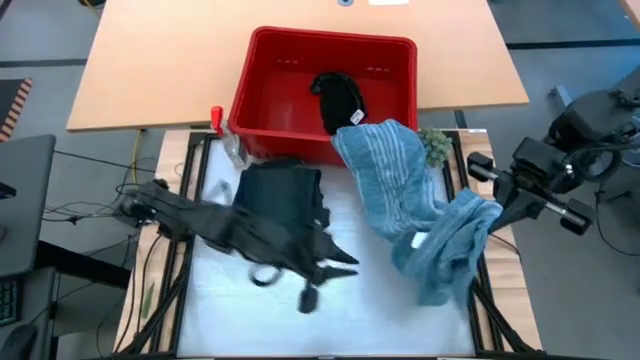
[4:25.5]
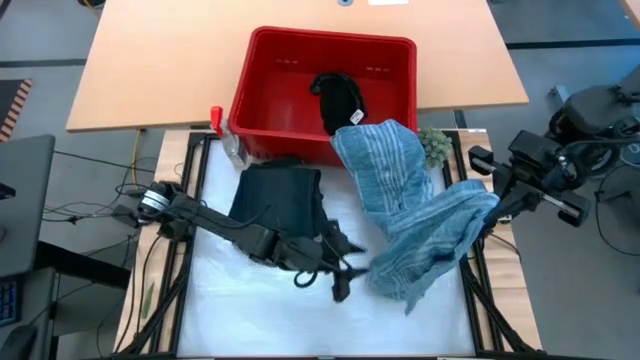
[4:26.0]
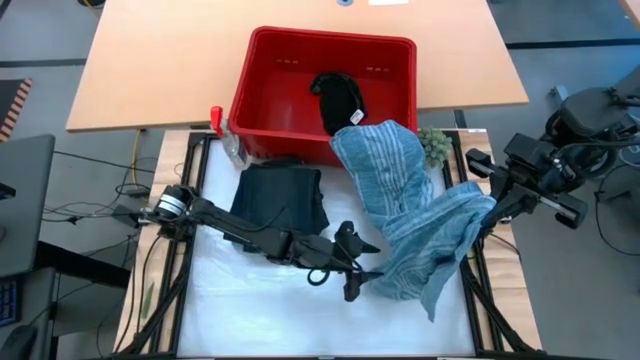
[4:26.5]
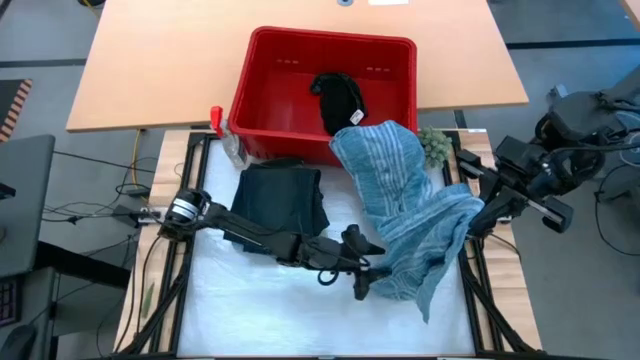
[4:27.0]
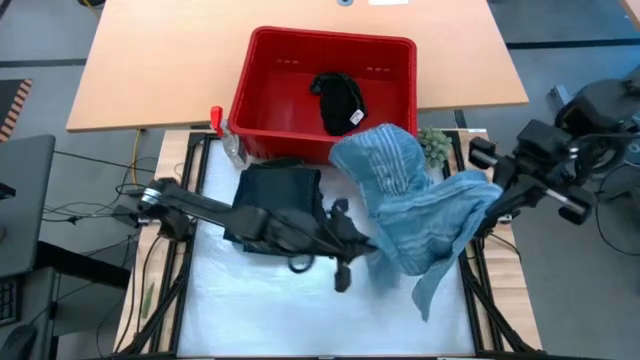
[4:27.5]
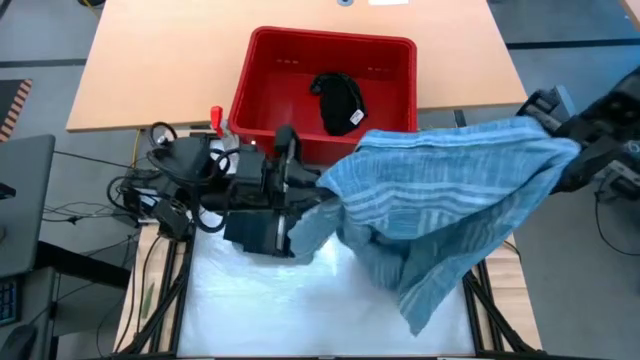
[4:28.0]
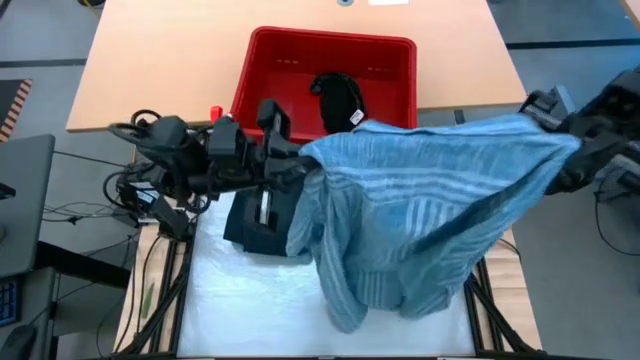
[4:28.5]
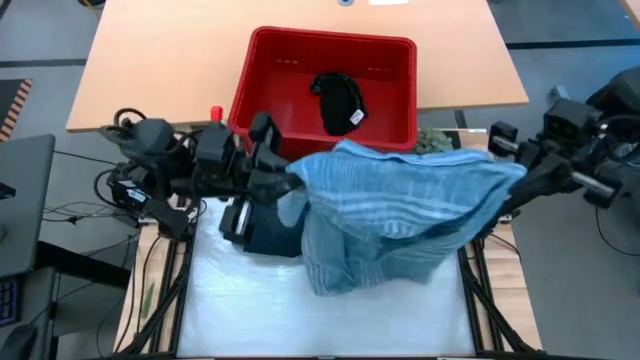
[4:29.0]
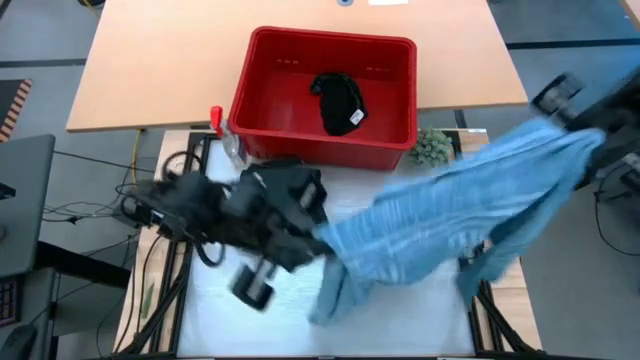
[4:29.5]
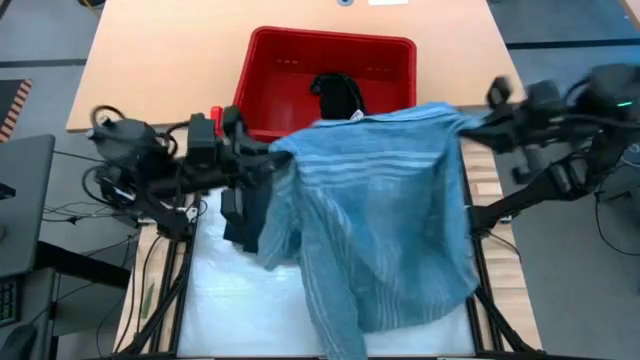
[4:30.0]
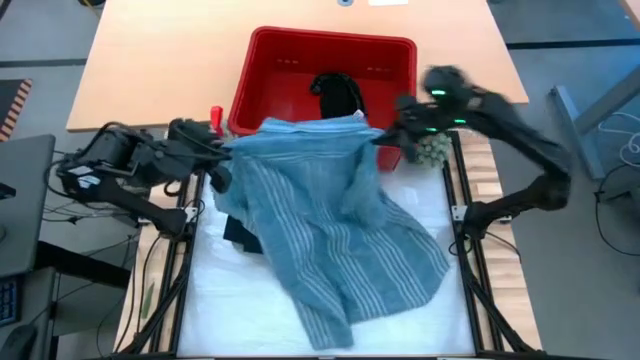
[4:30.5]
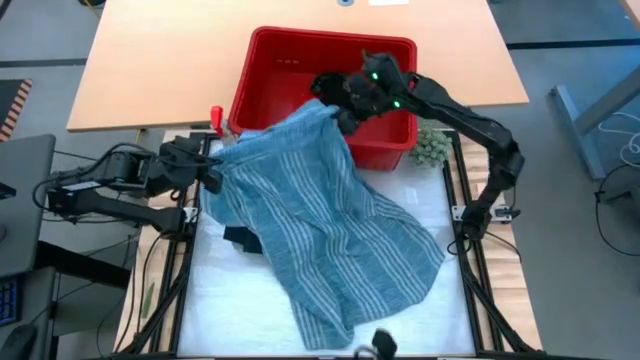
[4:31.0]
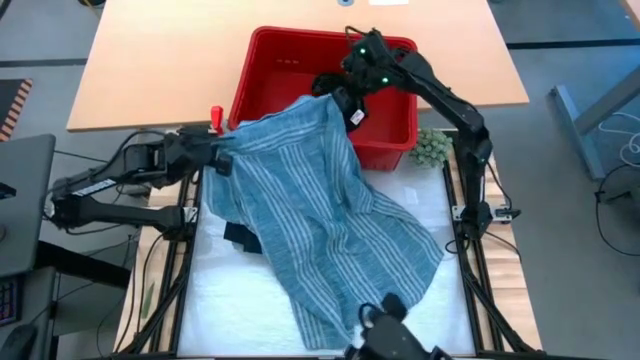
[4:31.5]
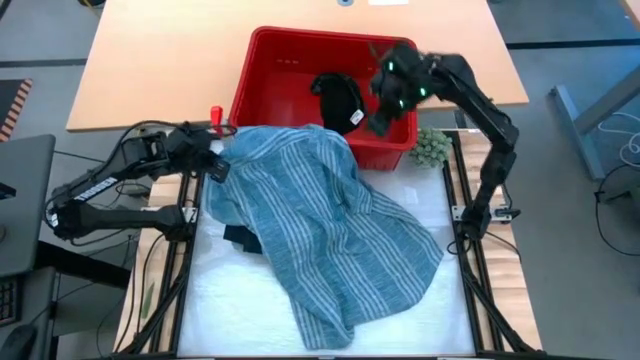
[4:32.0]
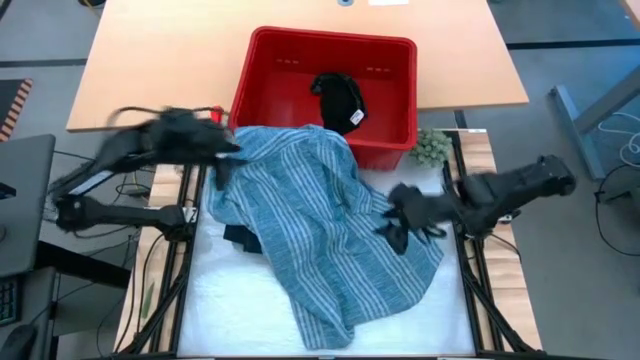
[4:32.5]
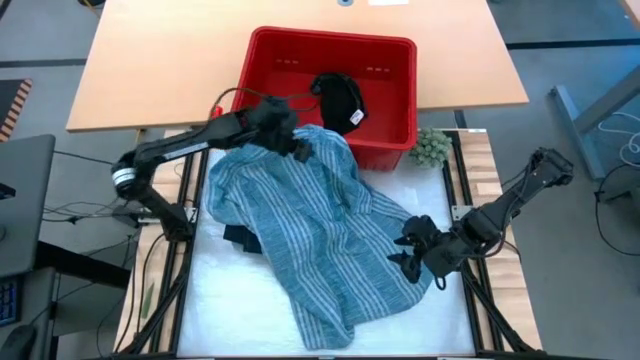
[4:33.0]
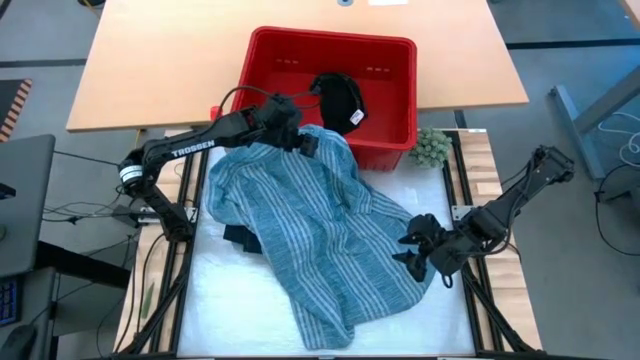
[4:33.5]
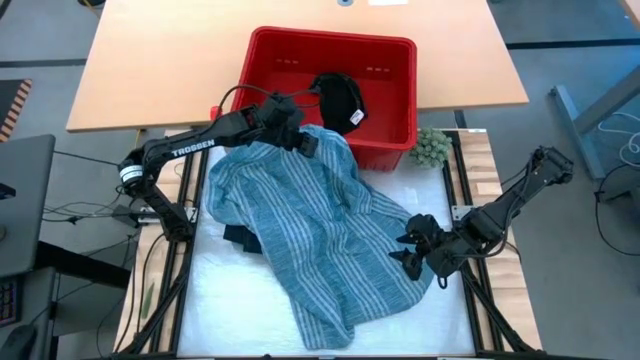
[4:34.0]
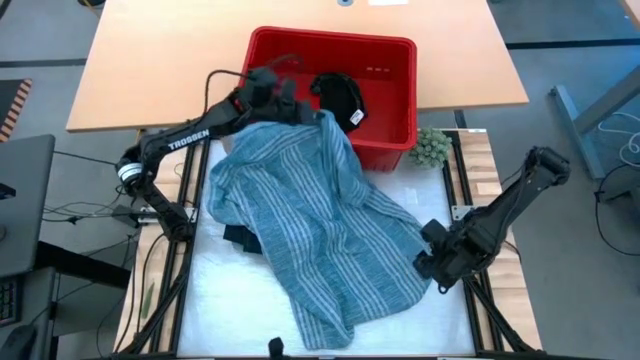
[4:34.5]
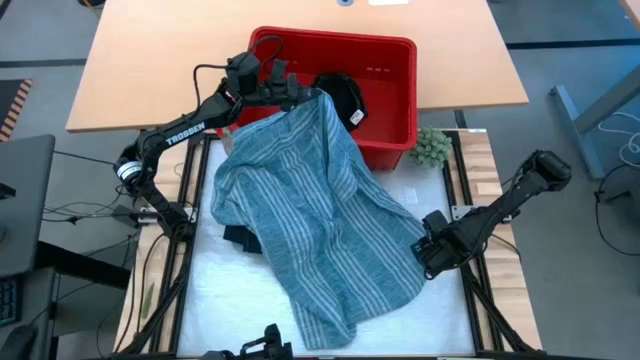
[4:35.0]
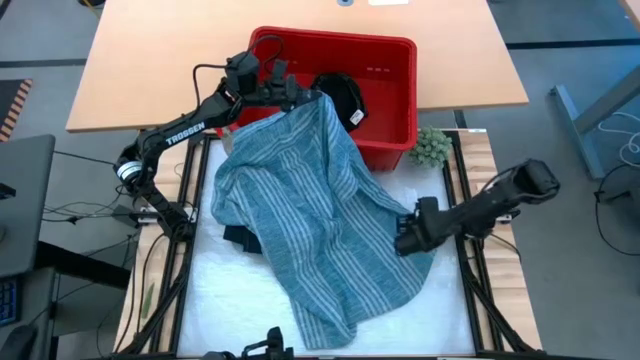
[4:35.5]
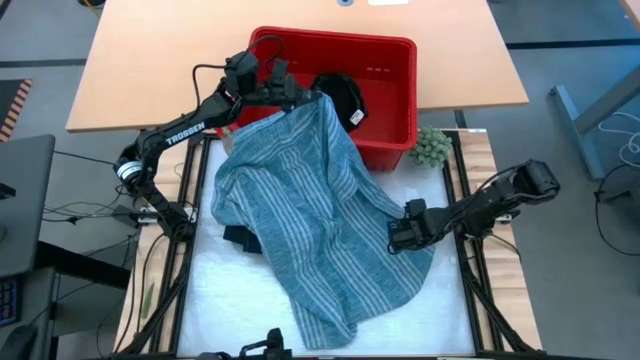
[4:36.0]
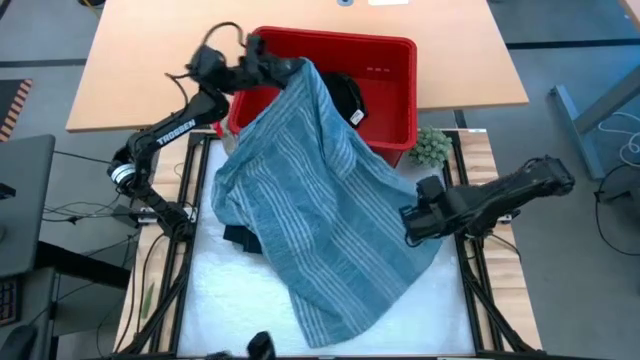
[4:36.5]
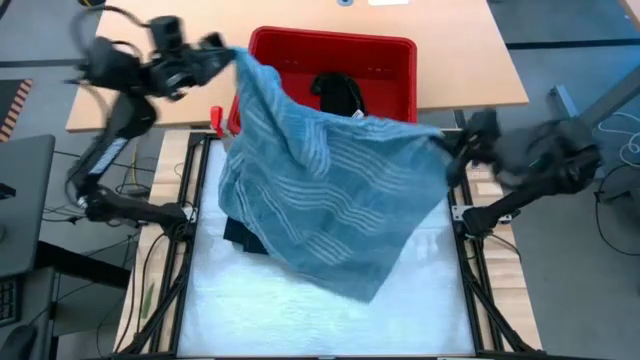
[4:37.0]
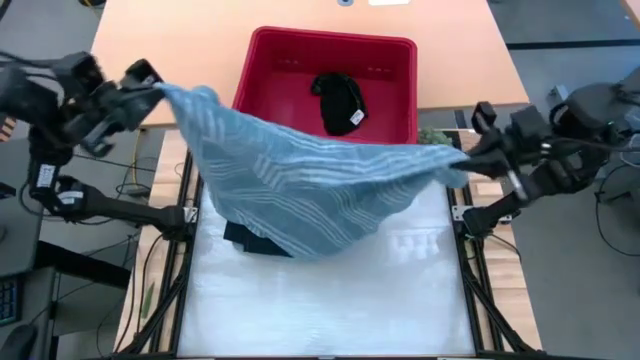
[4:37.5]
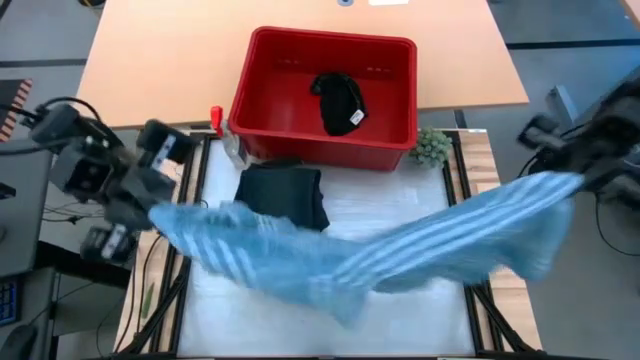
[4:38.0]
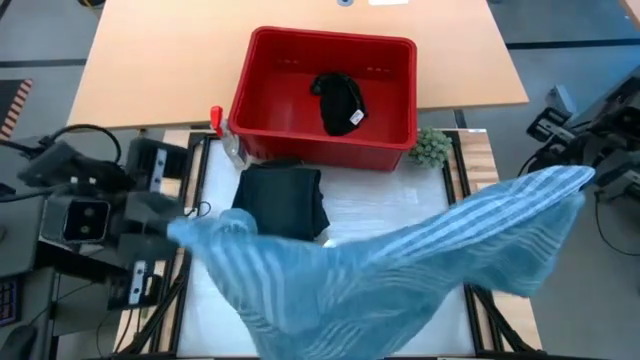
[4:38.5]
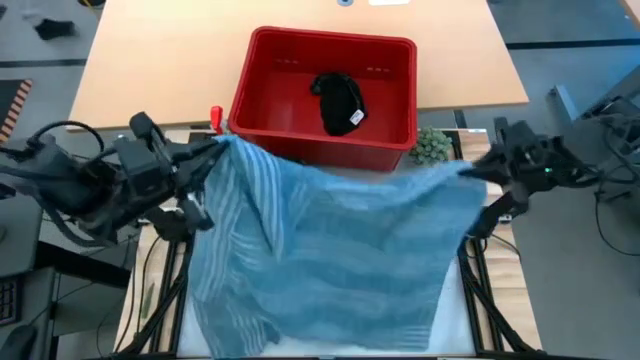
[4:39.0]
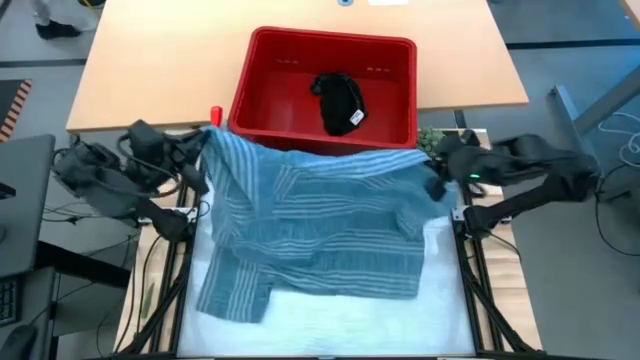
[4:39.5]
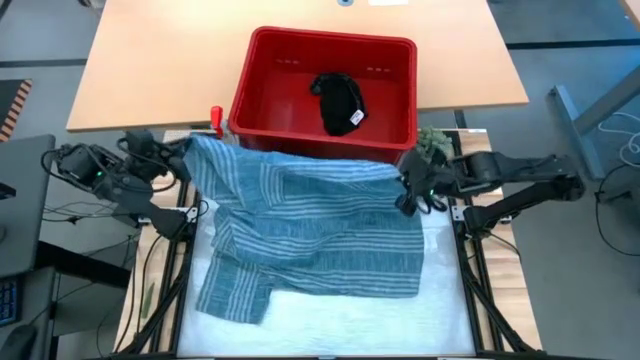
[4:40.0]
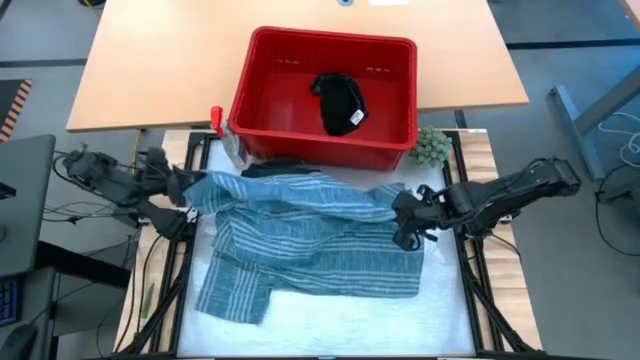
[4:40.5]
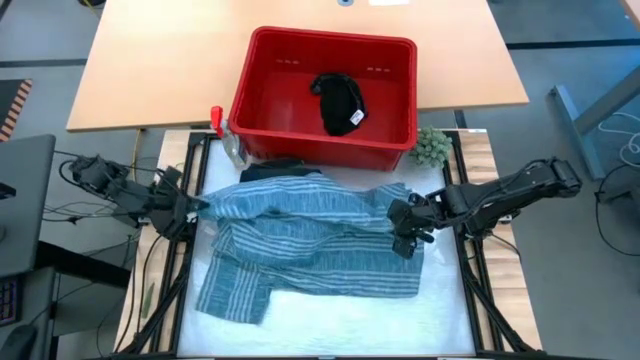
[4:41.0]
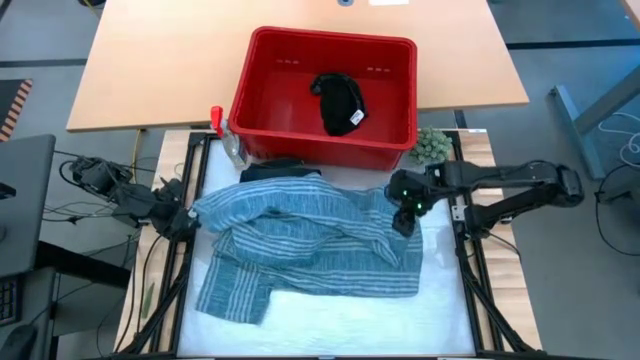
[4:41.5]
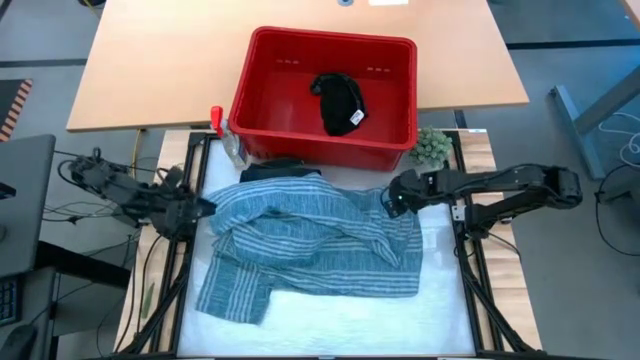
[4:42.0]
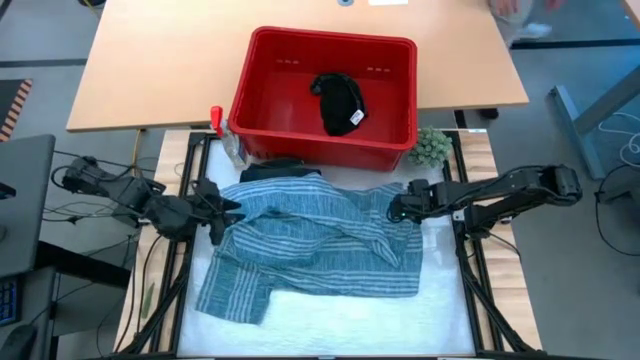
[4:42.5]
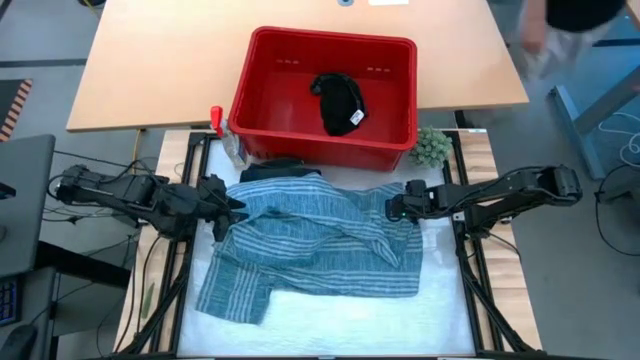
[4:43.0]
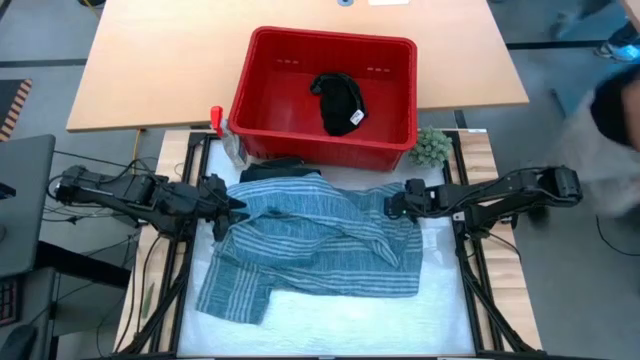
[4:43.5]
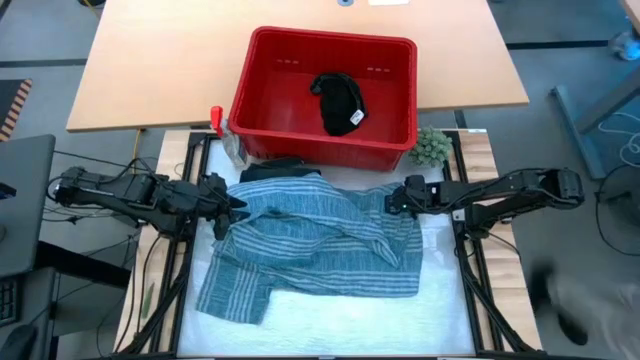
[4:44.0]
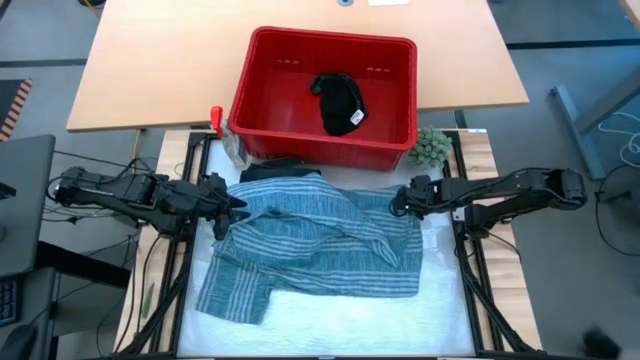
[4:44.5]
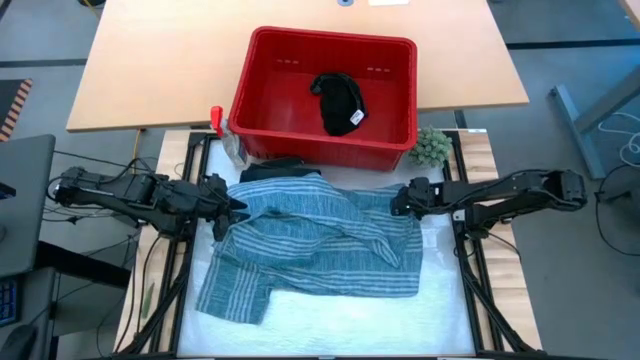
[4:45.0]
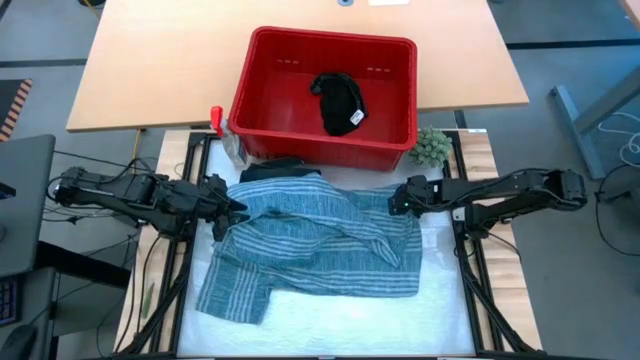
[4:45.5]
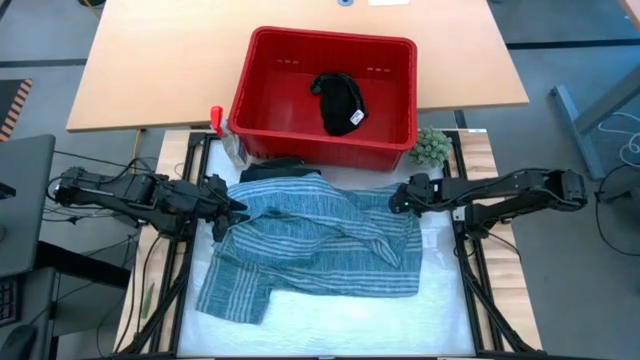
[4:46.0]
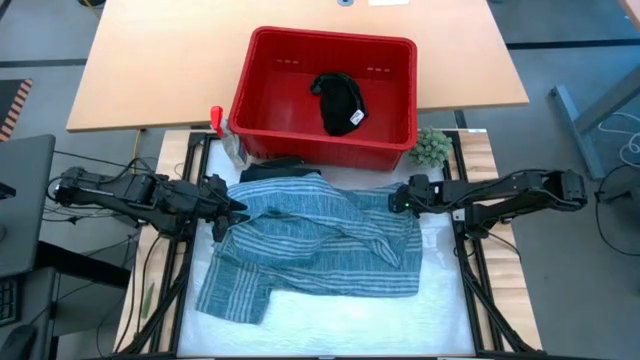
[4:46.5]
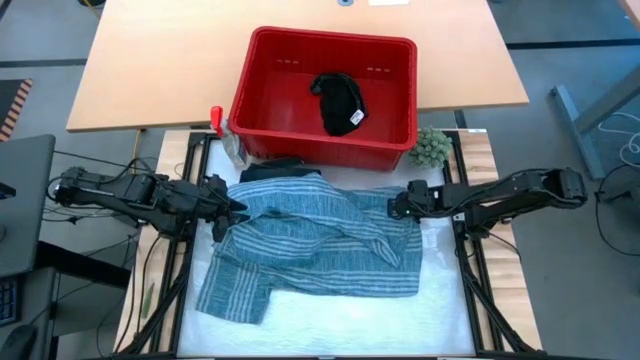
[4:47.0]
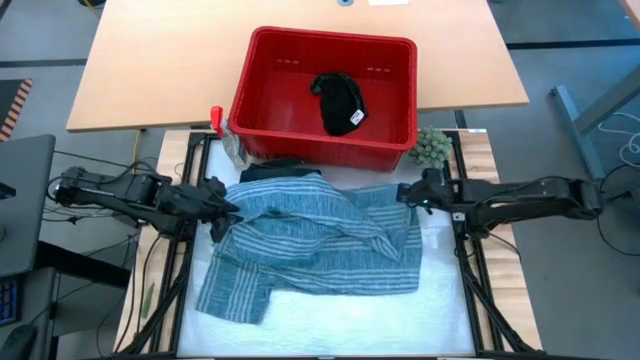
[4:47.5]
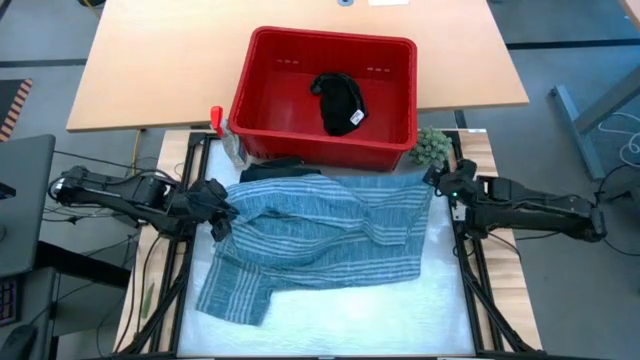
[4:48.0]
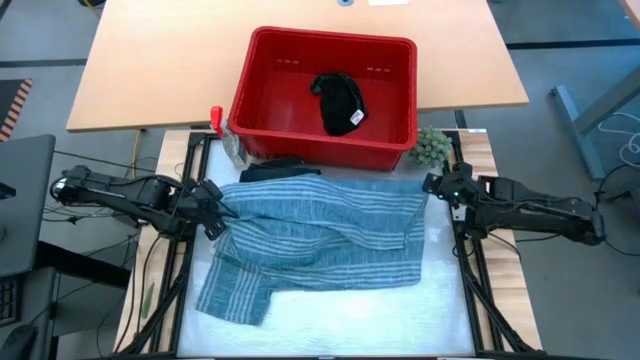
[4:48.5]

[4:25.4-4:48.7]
Task: Fold laundry
Fold the blue shirt from the red laundry bin
